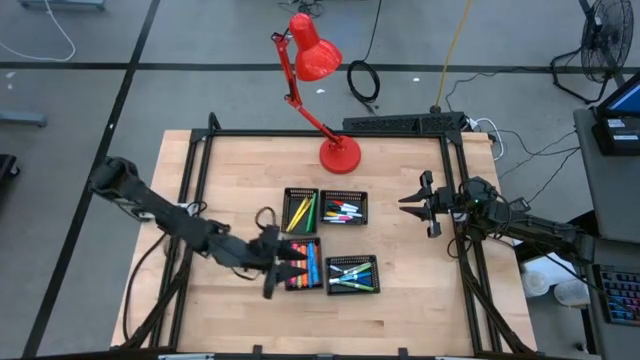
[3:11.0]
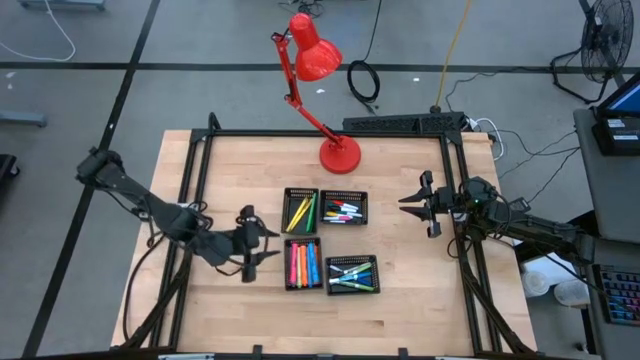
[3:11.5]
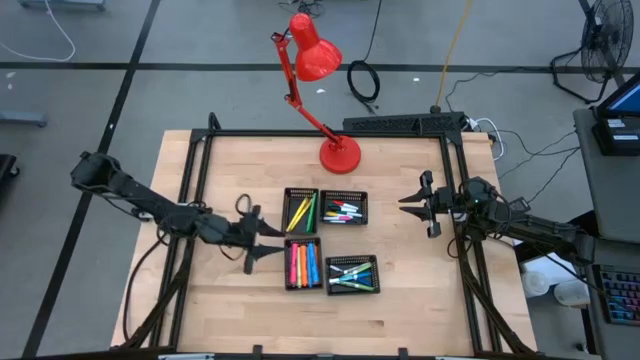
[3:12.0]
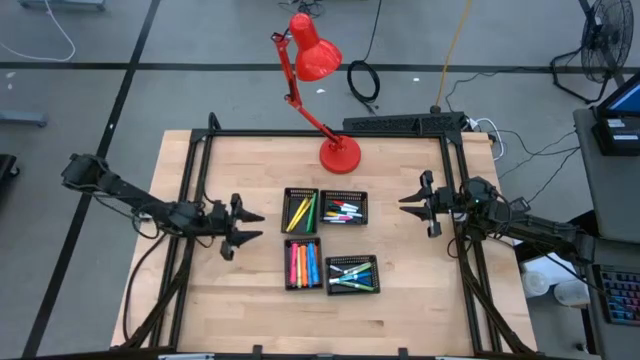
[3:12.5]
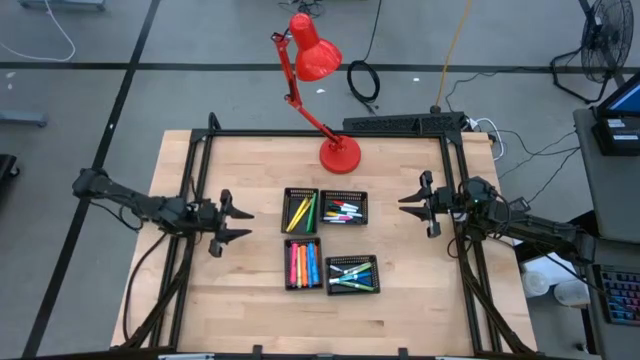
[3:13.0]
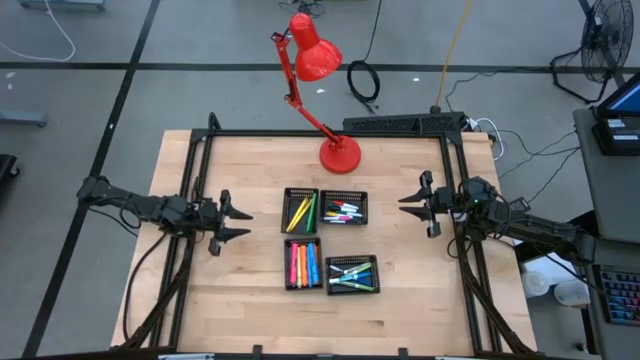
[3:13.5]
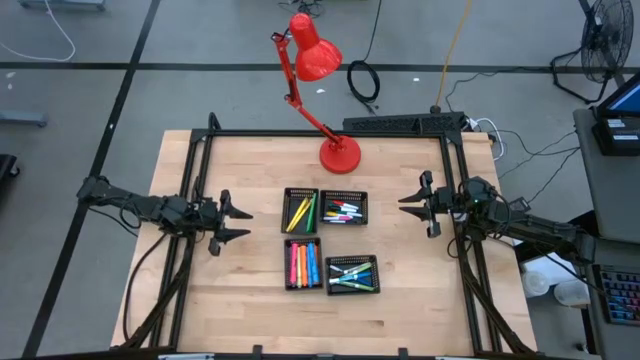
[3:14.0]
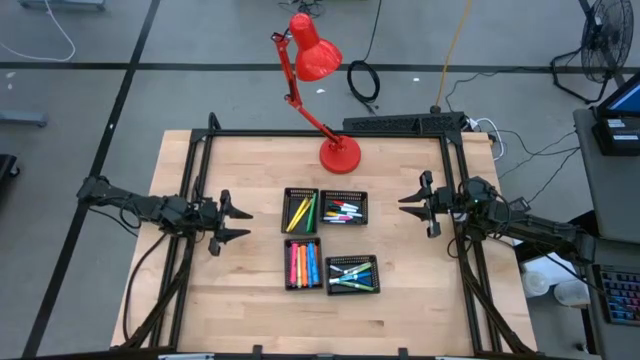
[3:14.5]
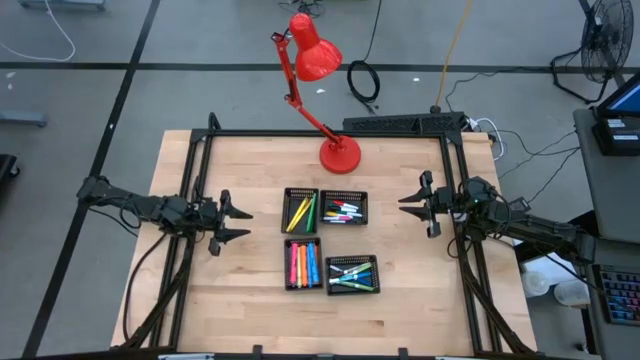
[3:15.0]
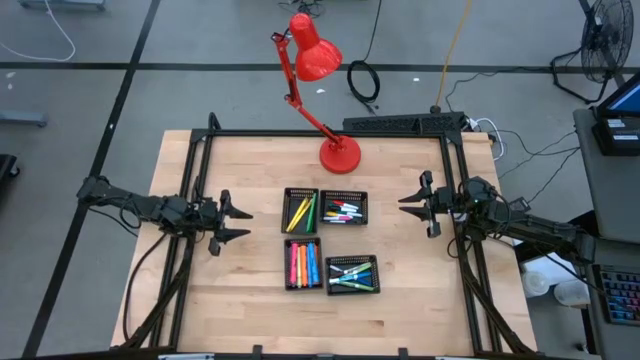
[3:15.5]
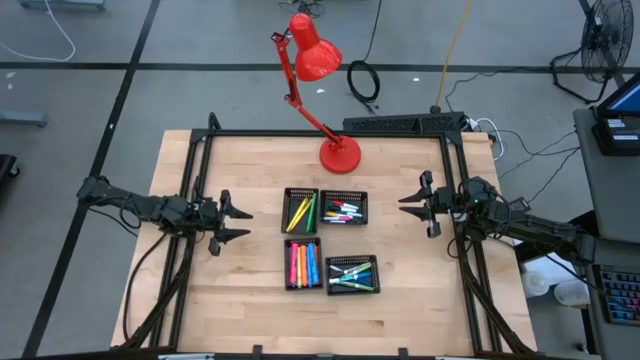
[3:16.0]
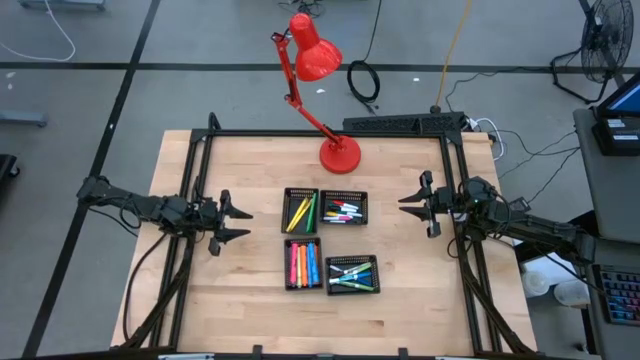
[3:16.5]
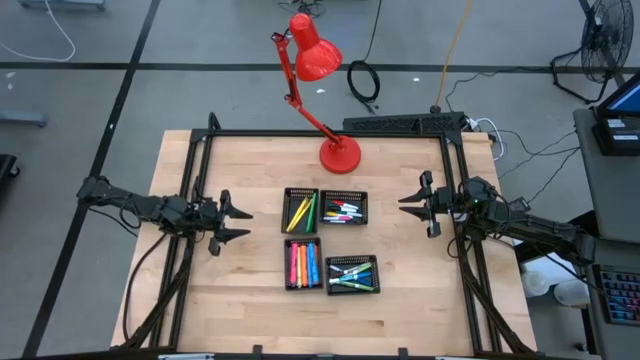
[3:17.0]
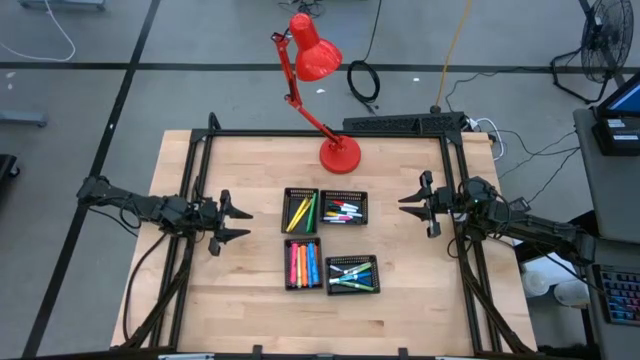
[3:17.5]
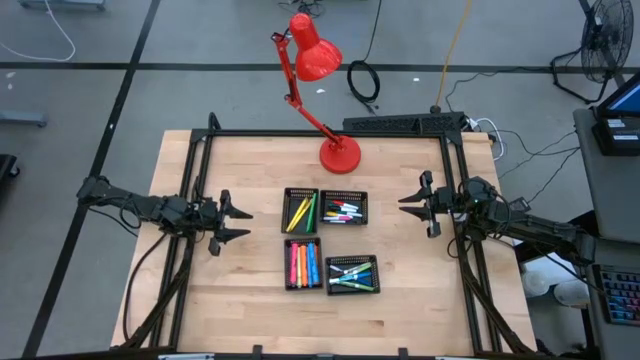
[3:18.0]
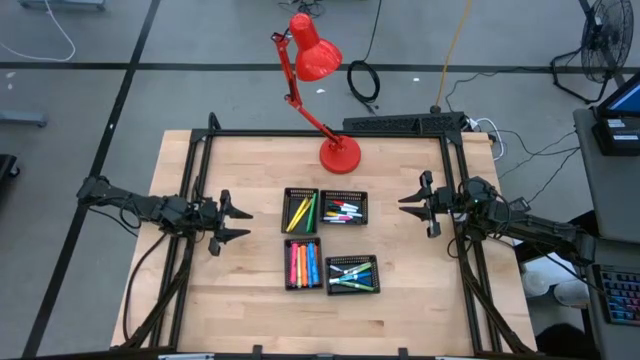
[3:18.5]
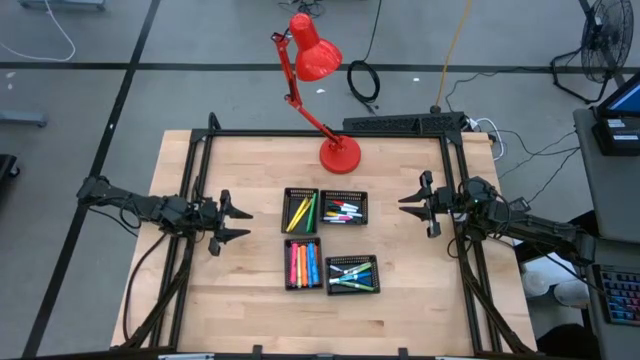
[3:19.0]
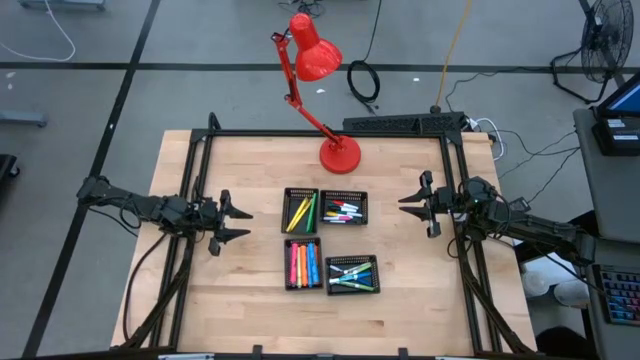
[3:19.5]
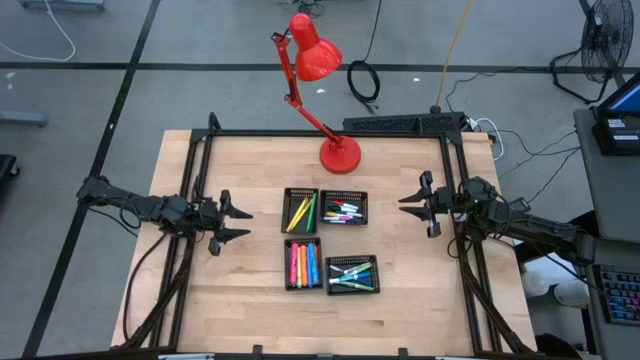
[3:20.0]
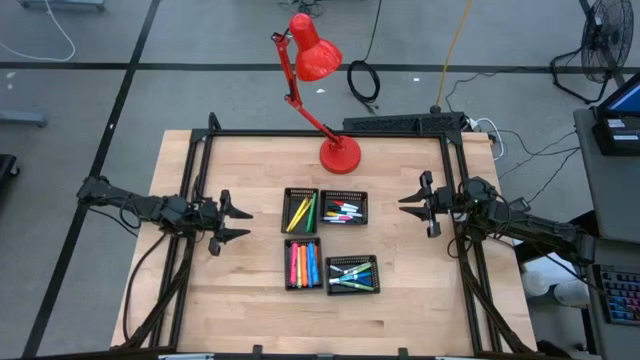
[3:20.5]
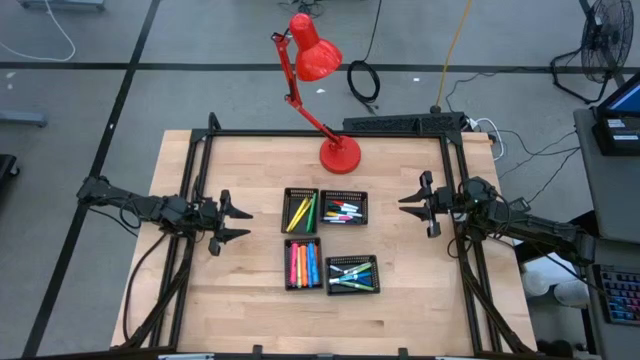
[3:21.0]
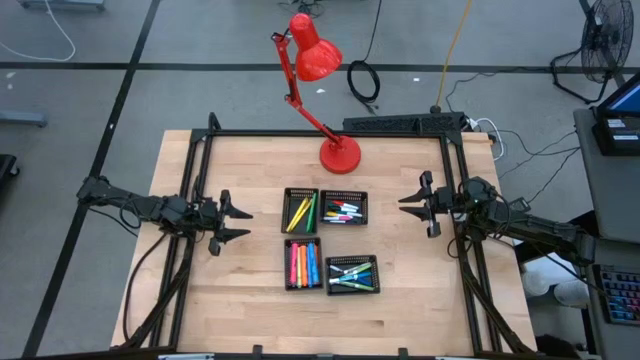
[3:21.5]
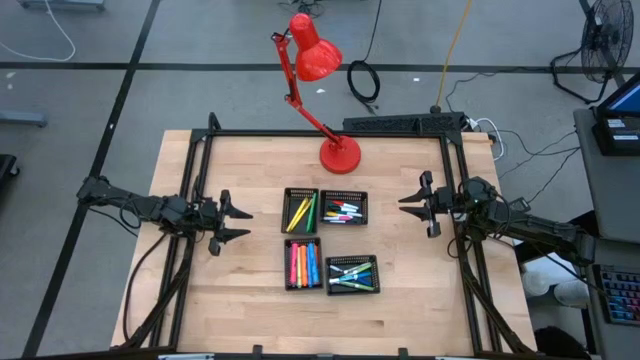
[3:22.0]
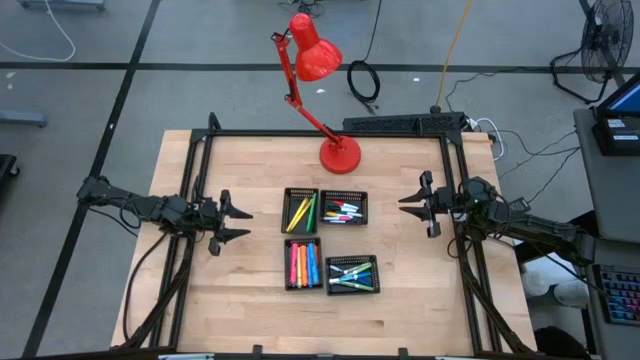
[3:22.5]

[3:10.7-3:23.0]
Task: Pick & Place Markers
Return to Home Position

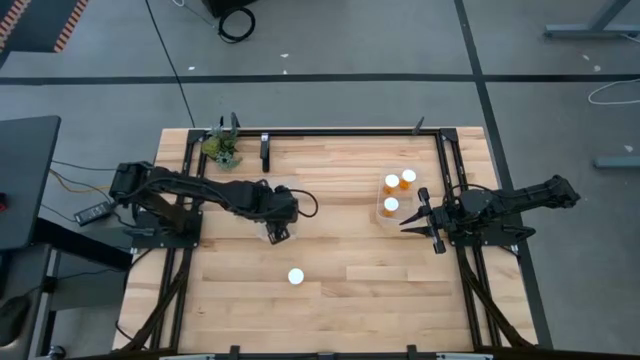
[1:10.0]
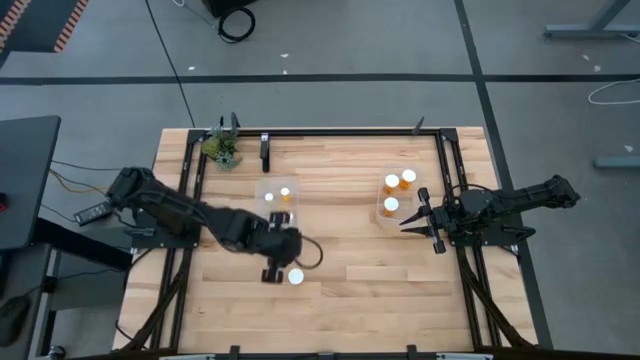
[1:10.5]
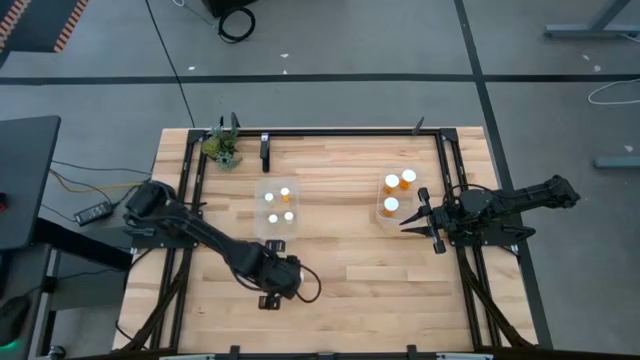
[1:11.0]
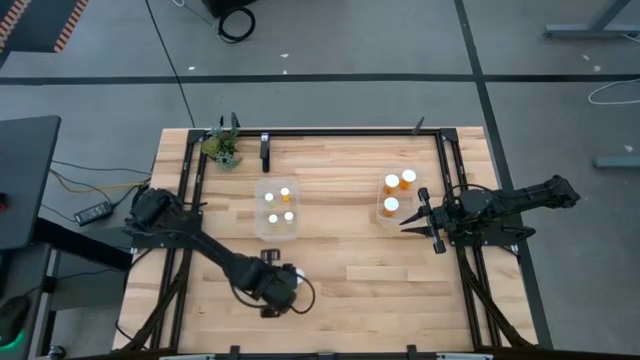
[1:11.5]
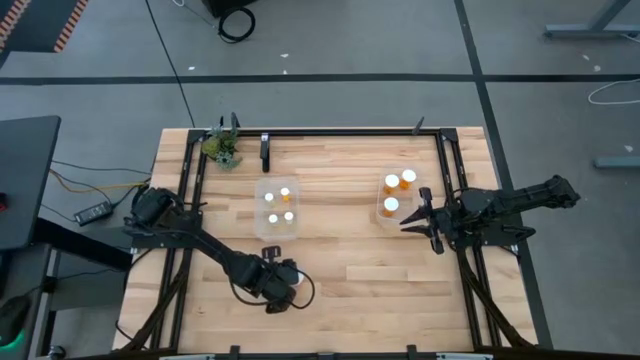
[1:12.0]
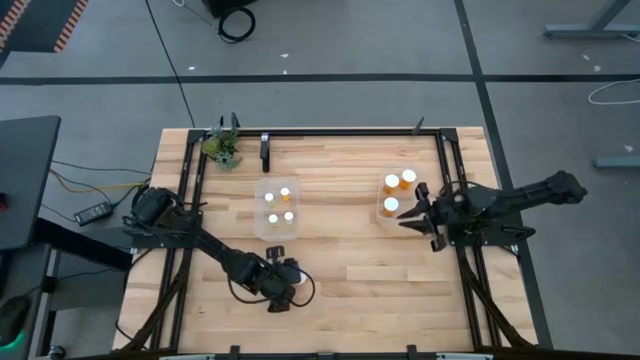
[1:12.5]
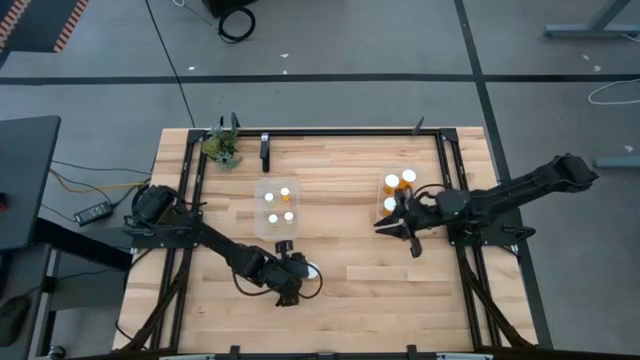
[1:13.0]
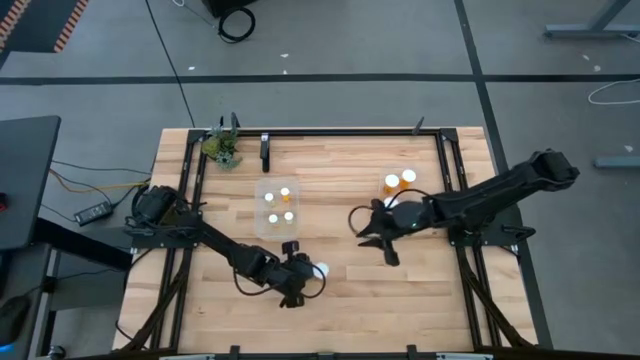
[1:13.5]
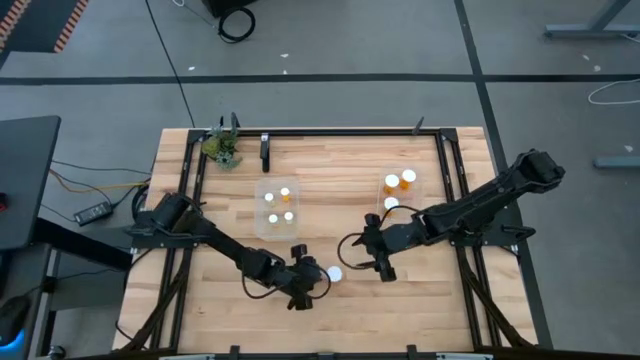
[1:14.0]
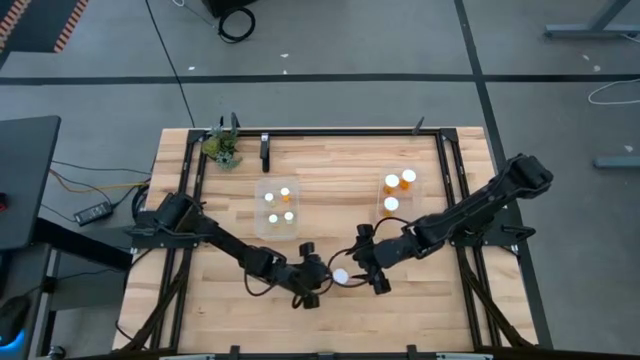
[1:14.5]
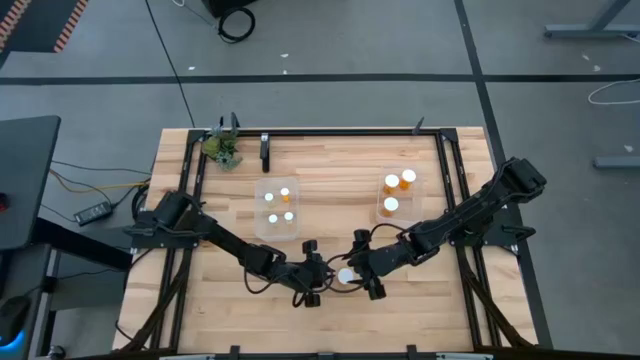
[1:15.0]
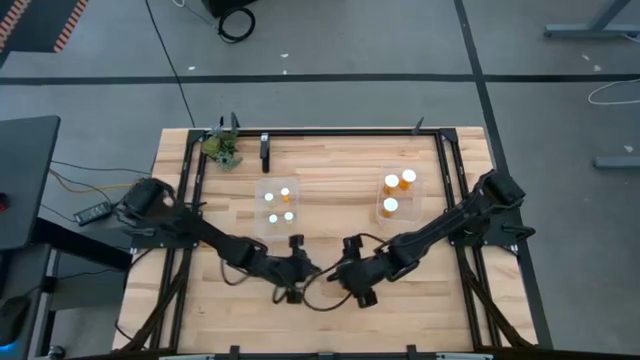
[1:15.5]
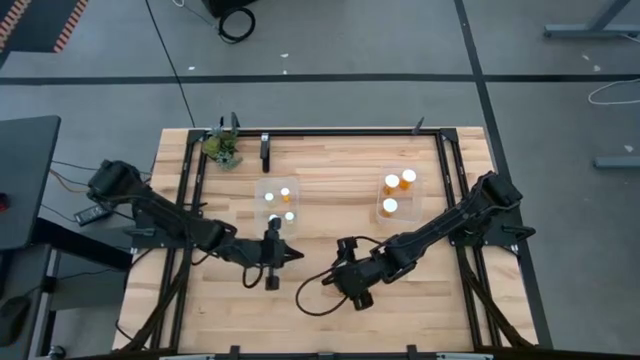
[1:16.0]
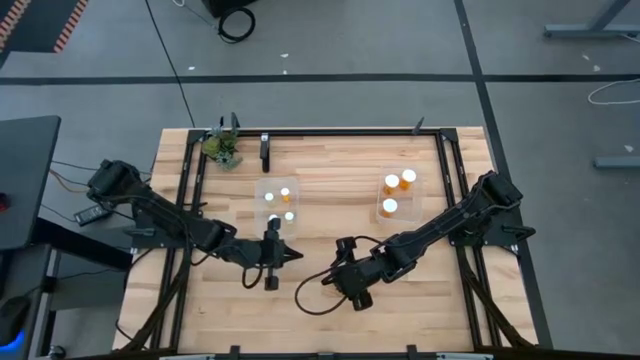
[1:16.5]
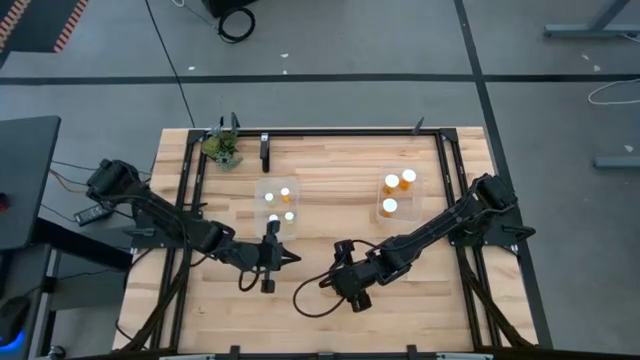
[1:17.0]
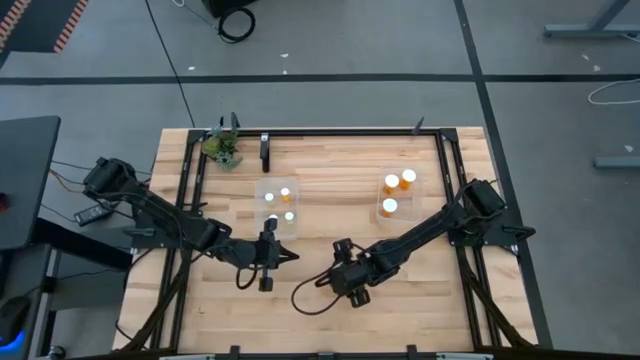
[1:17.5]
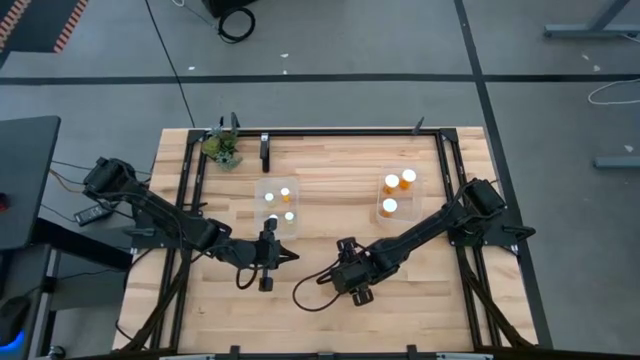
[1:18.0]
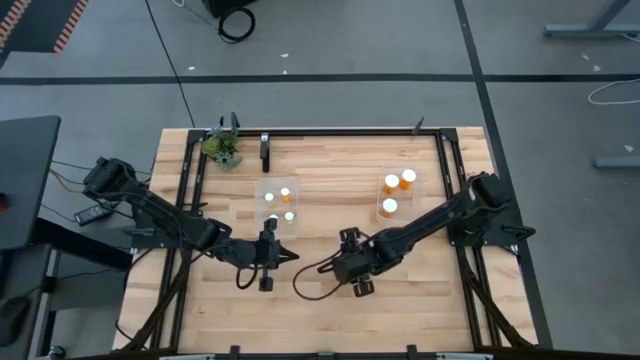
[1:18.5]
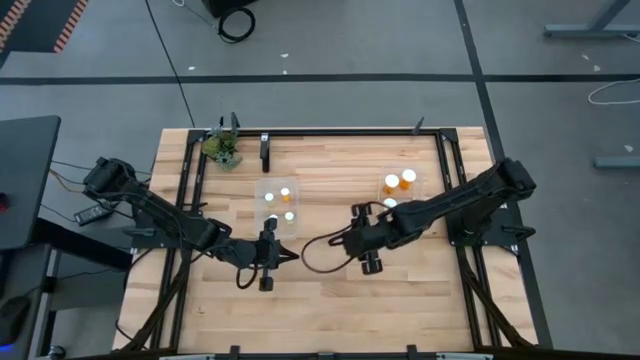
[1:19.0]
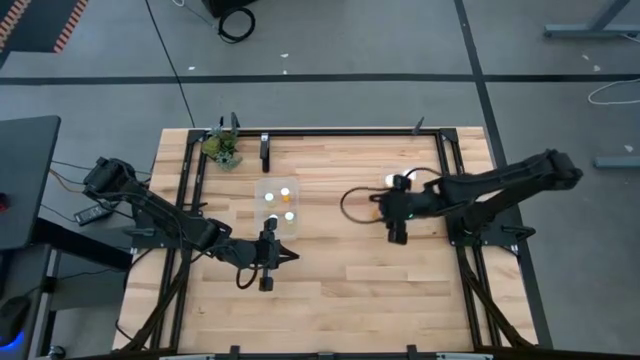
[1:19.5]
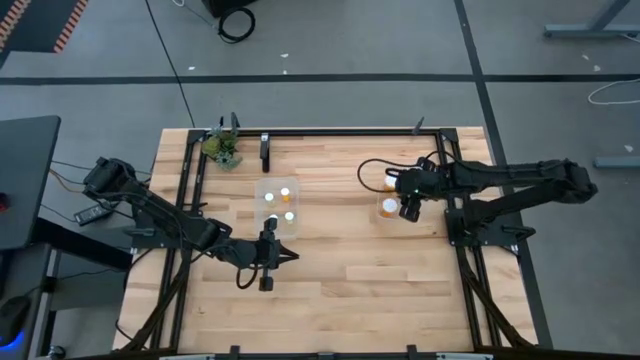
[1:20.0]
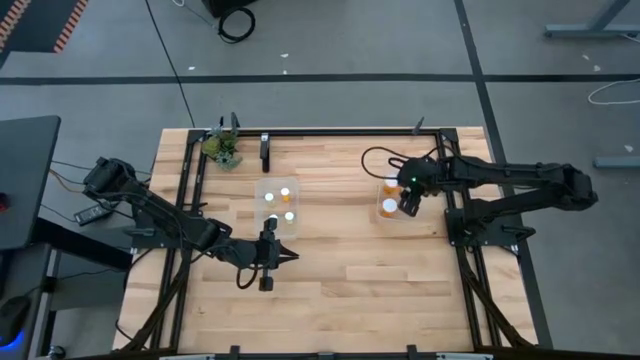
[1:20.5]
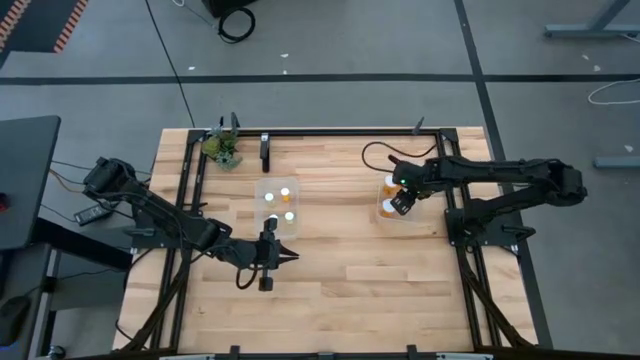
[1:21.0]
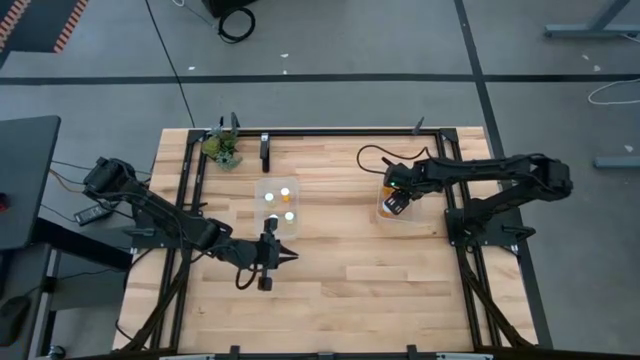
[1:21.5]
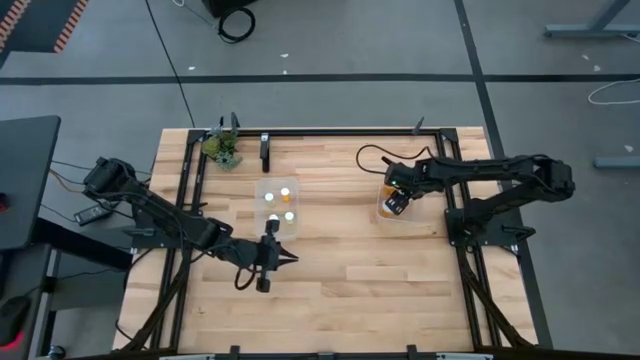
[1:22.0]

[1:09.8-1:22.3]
Task: Pick and place medicine bottles into bin by pill shape (circle, oval)
Put the large orange pill bottle into the right transparent bin
